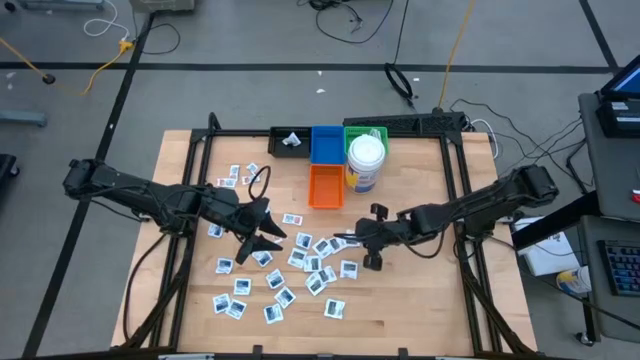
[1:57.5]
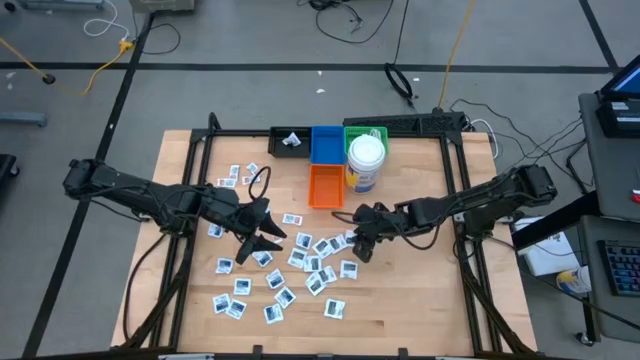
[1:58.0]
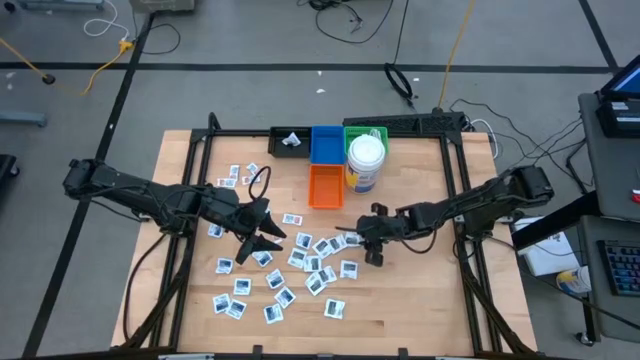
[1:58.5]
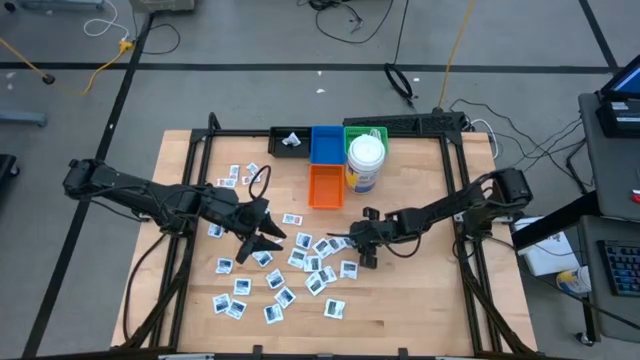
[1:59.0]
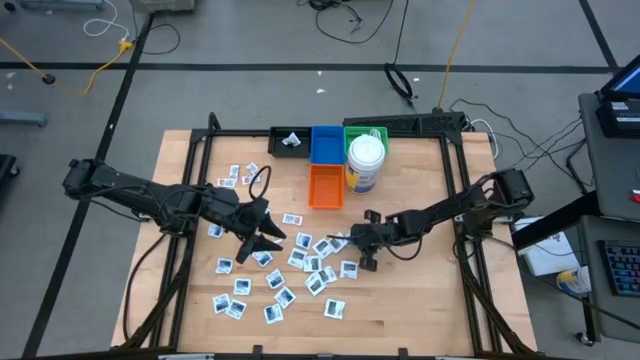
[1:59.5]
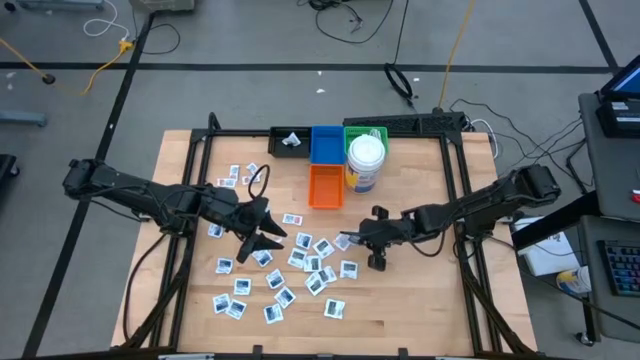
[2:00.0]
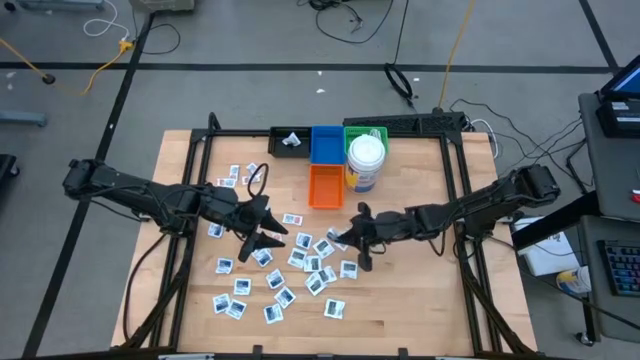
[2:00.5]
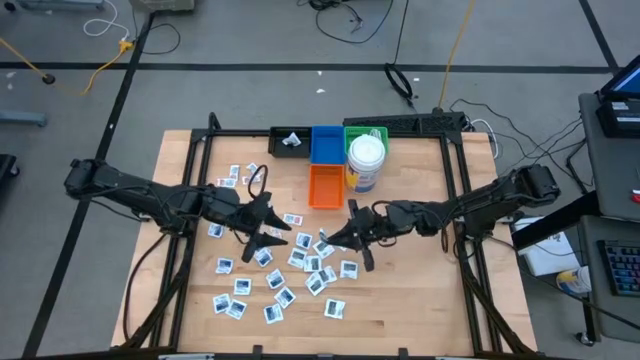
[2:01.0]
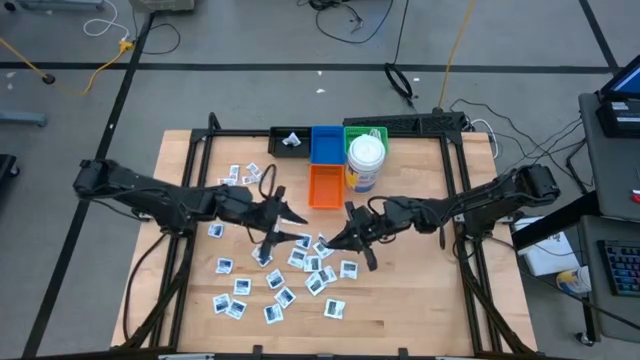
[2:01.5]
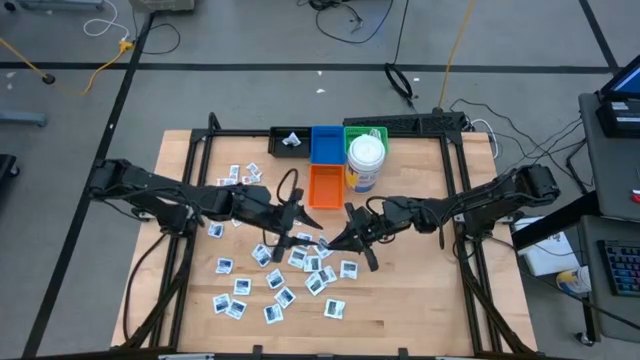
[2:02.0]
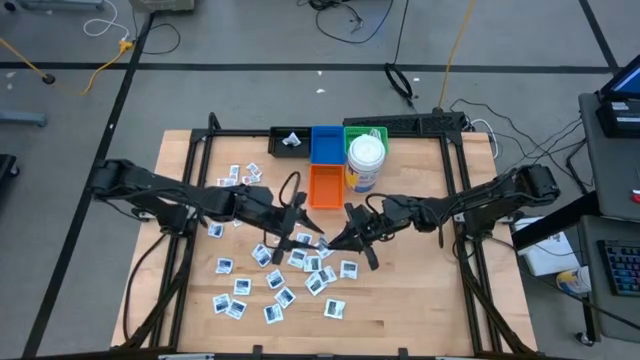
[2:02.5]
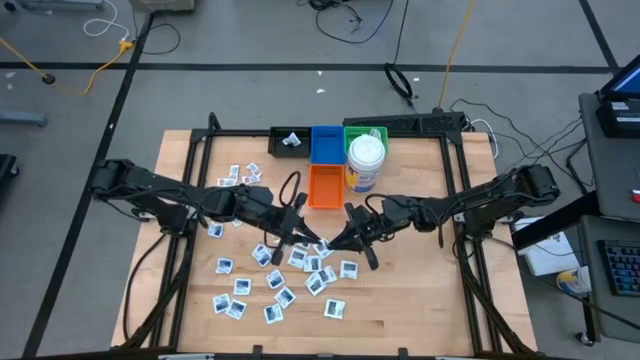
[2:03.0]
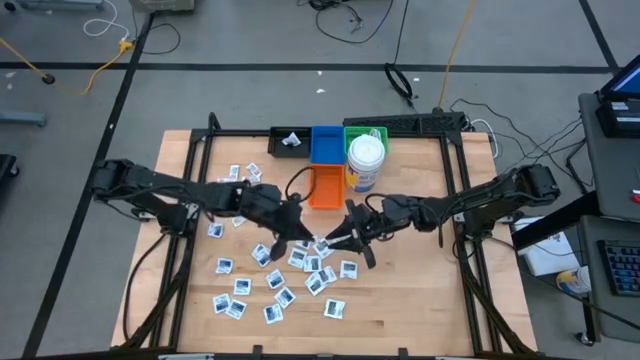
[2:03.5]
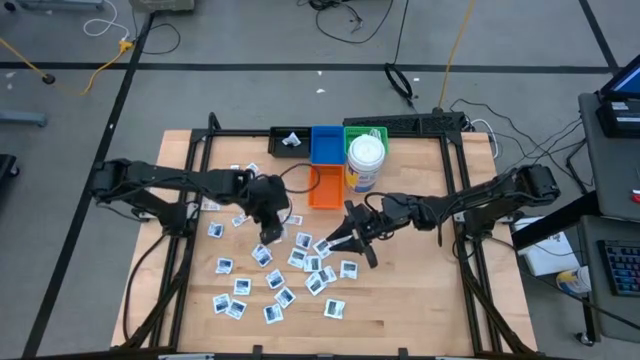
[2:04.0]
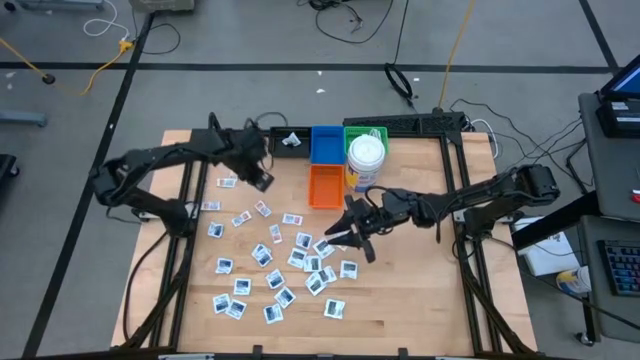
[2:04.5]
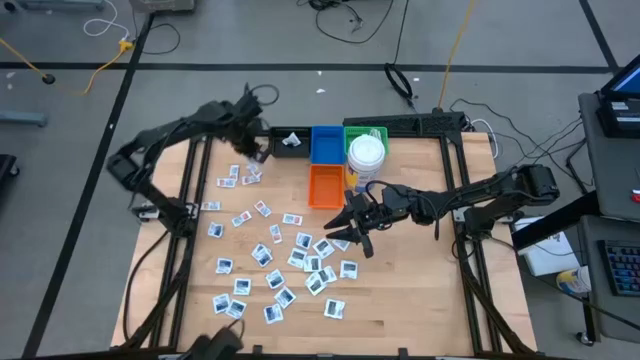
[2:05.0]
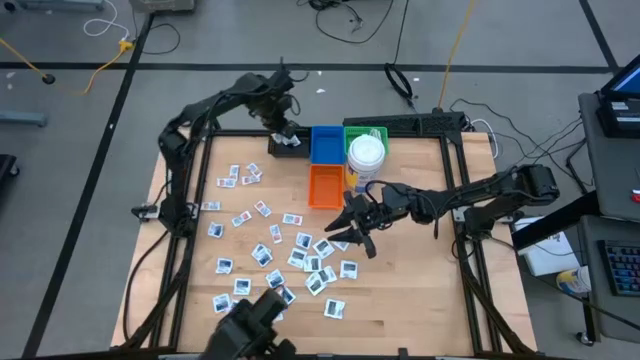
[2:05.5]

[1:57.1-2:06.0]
Task: Pick & Place First Aid Supplies
Put the gray towelette pack into the black bin

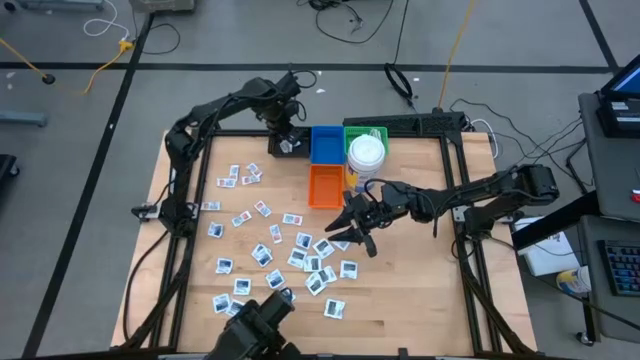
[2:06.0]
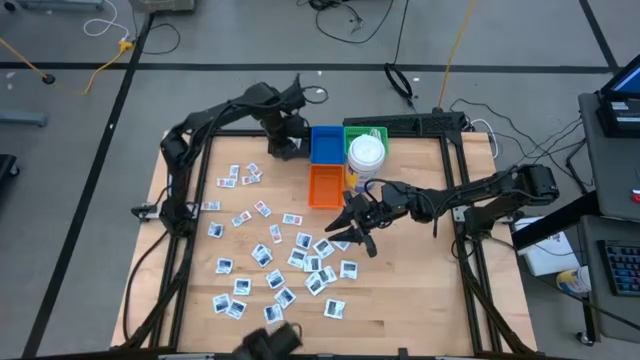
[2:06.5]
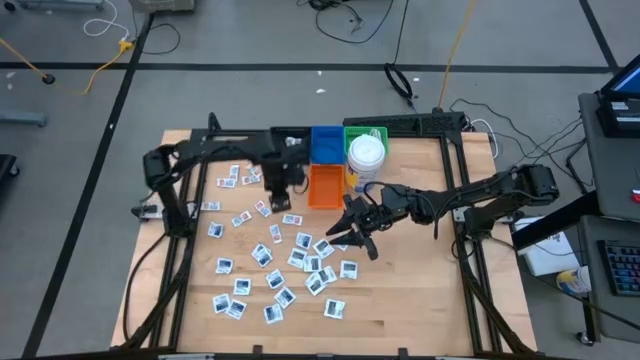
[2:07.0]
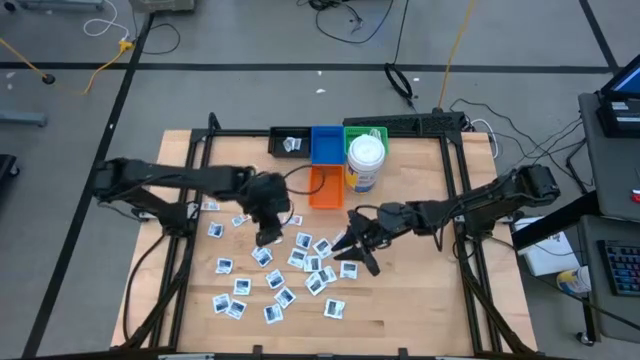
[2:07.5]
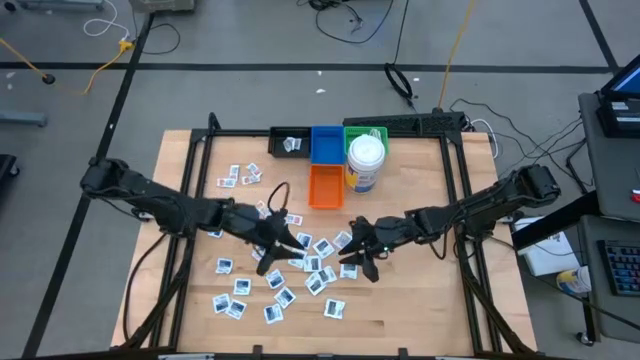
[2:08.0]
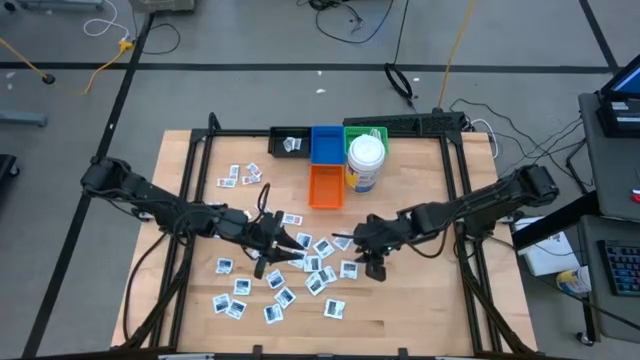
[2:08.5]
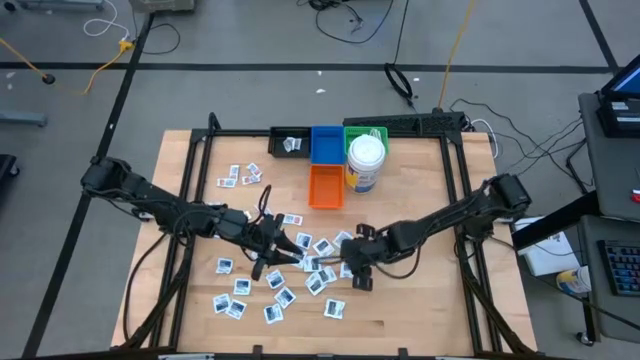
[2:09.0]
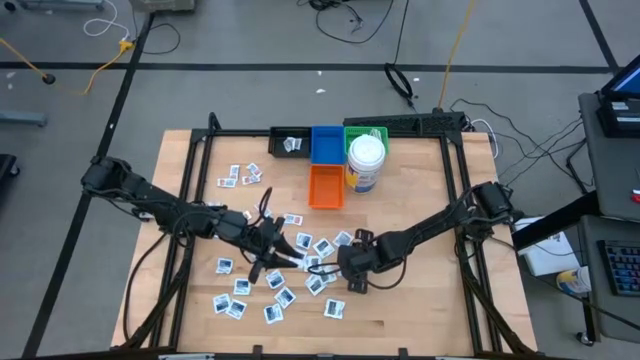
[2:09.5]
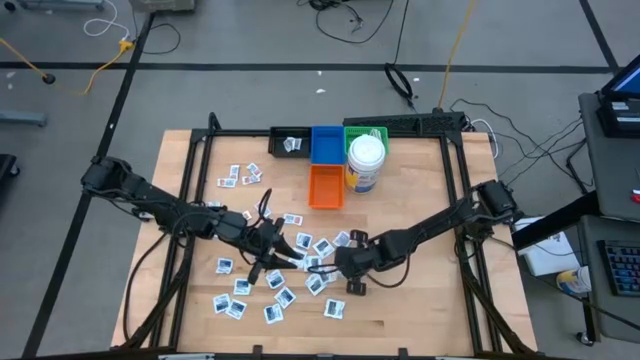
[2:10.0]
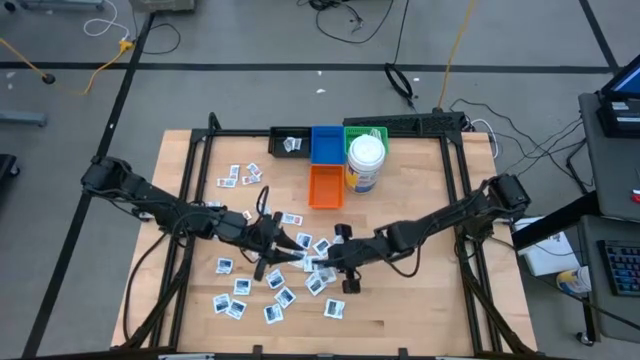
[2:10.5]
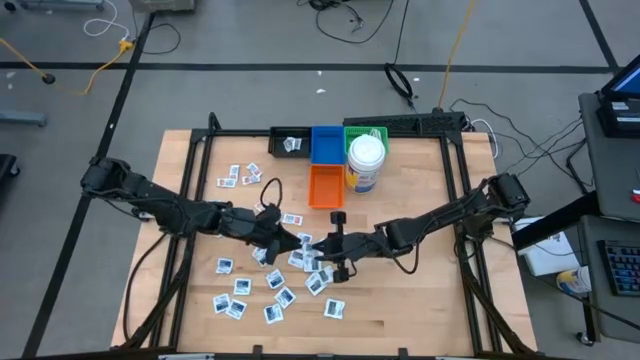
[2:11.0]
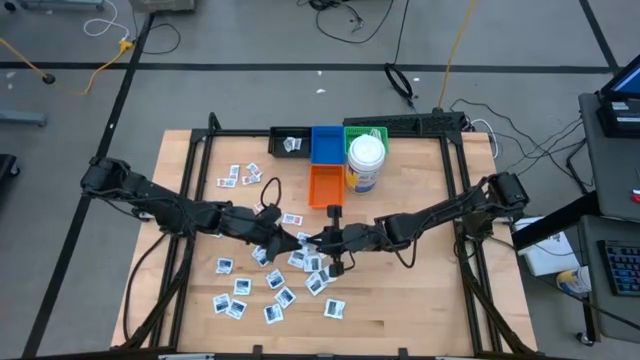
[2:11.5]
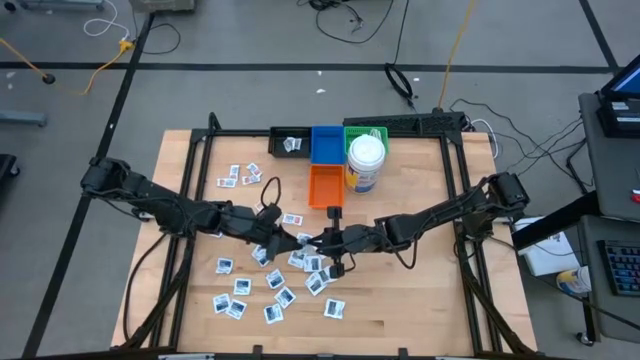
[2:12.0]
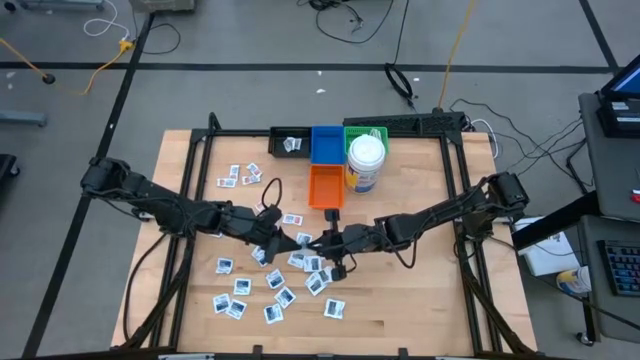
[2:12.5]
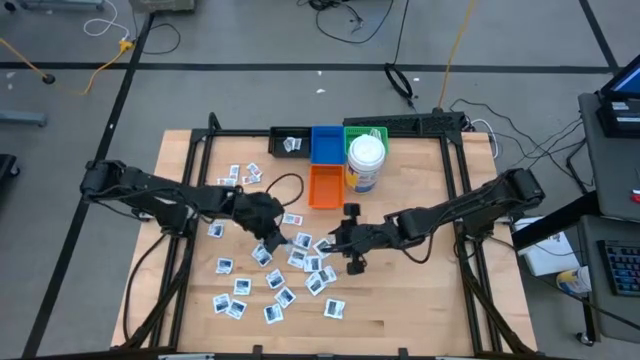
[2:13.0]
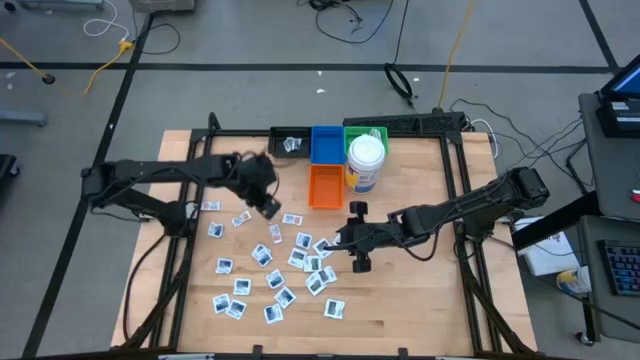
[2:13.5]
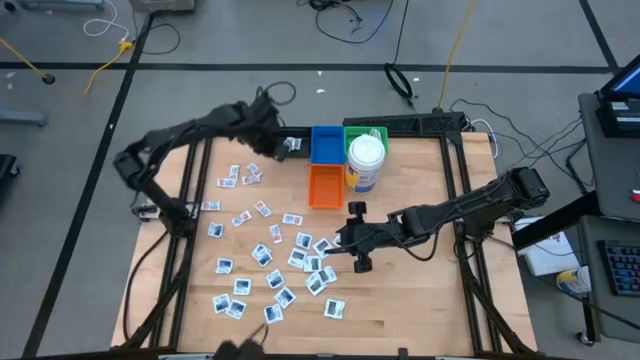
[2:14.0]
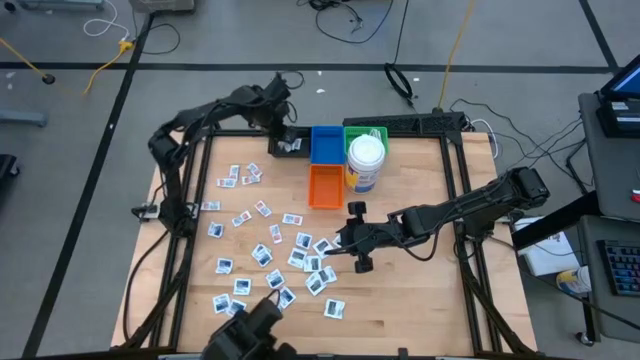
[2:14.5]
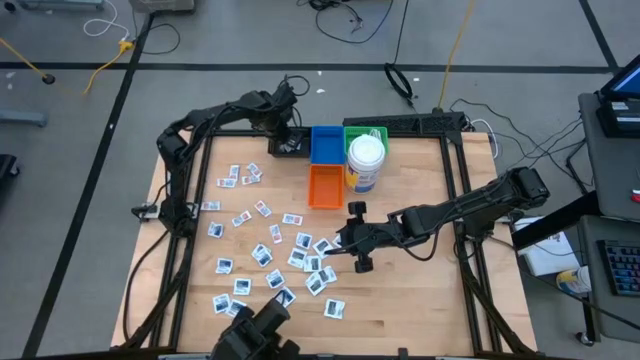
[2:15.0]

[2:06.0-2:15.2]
Put the gray towelette pack into the black bin

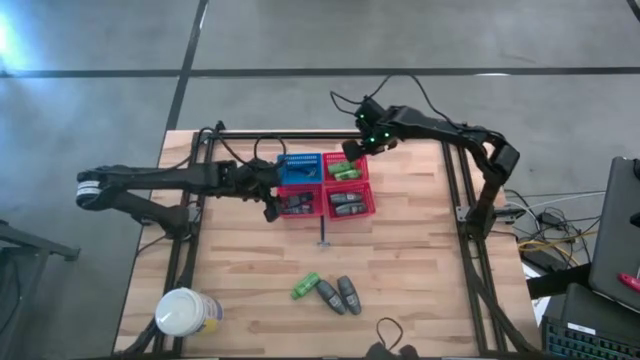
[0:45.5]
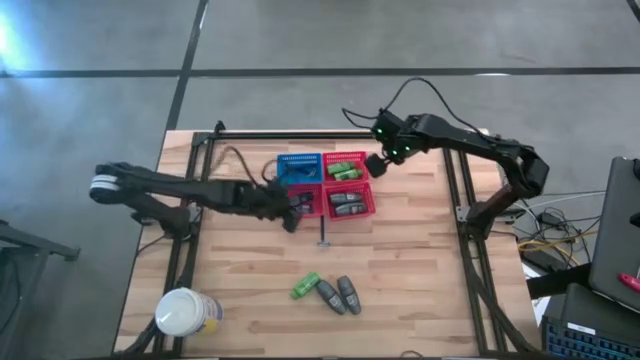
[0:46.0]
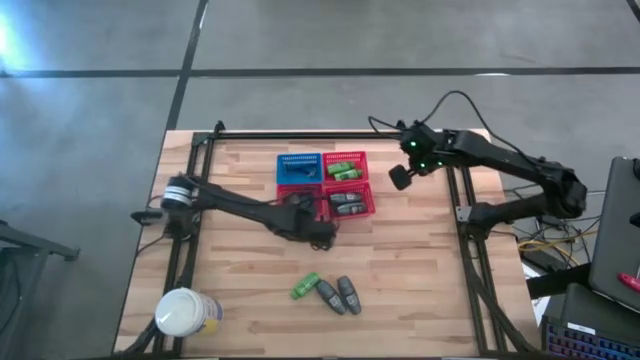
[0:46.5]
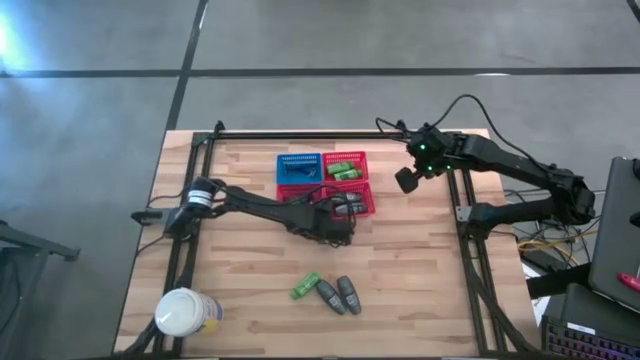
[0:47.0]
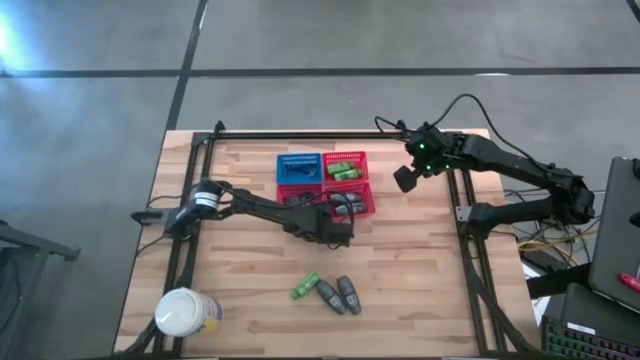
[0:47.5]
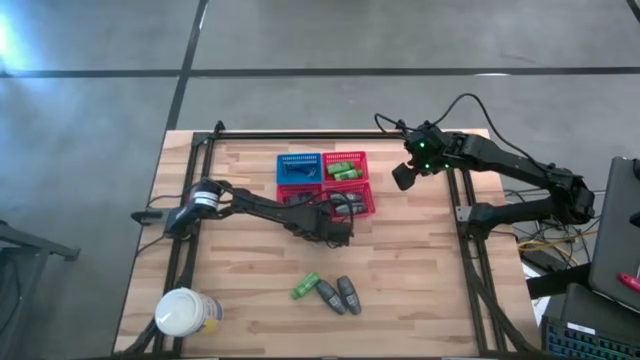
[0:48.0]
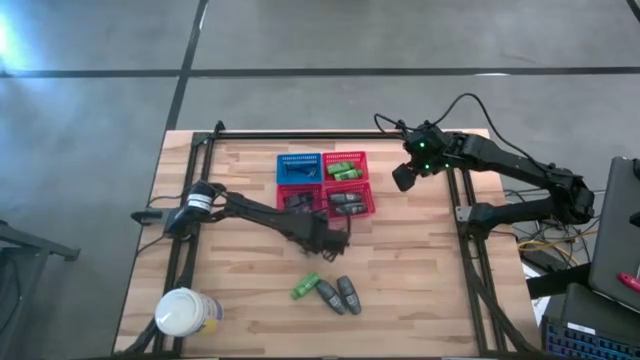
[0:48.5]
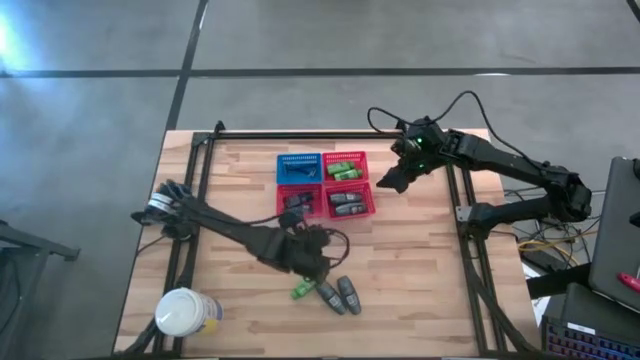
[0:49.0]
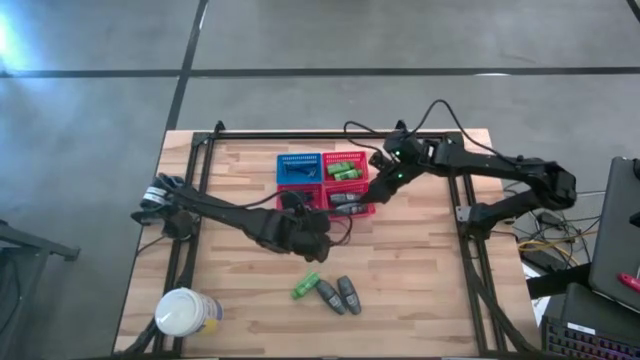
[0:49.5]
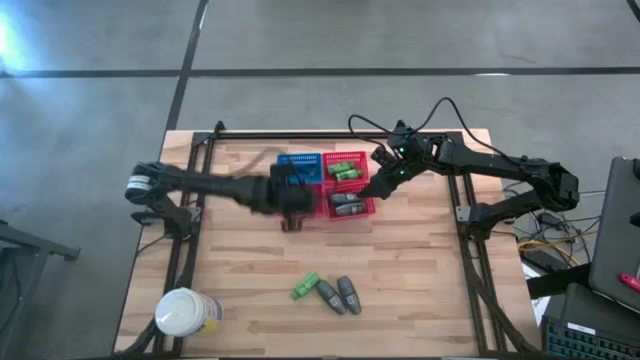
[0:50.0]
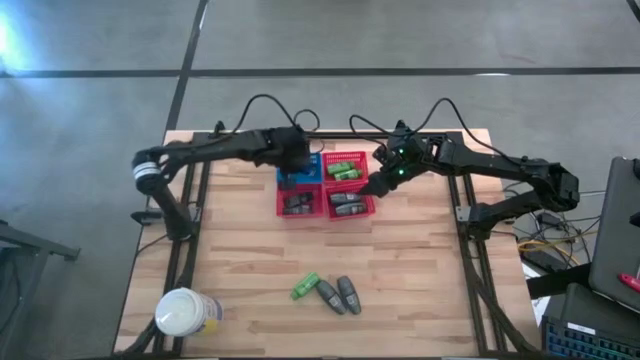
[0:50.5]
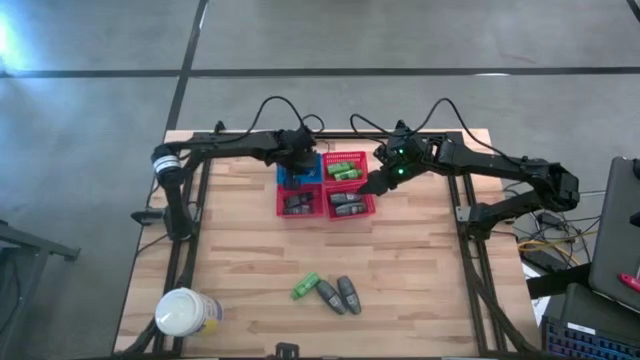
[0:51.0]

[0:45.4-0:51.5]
Task: Pick & Place Travel size toiletries
Put the razor into the blue bin
